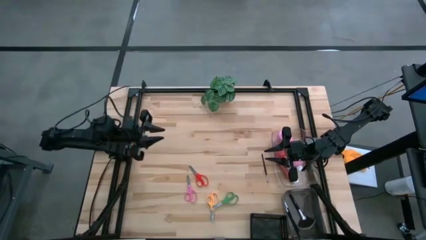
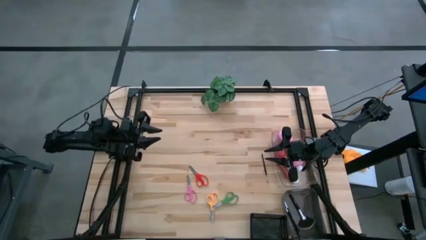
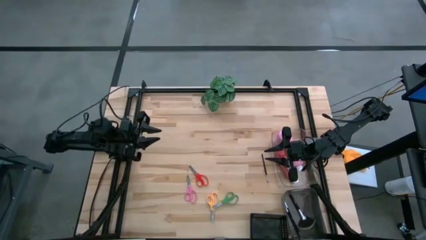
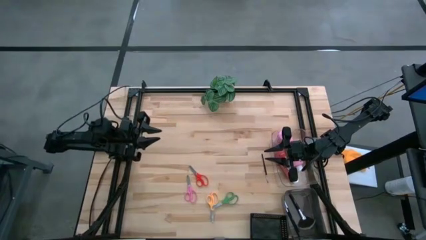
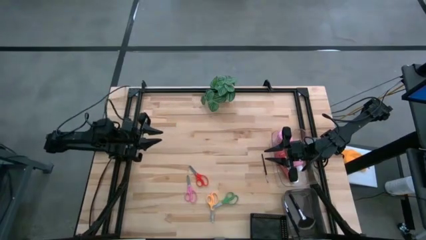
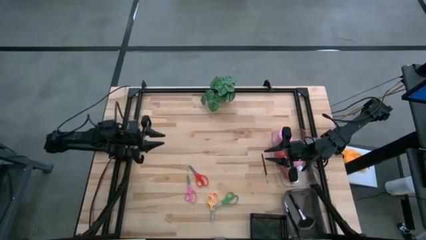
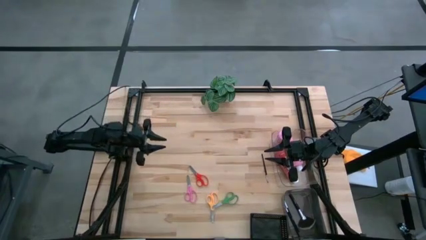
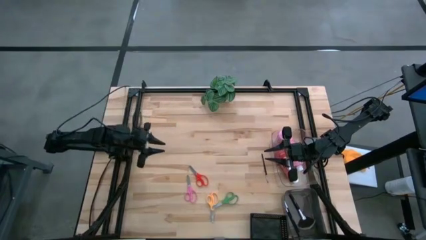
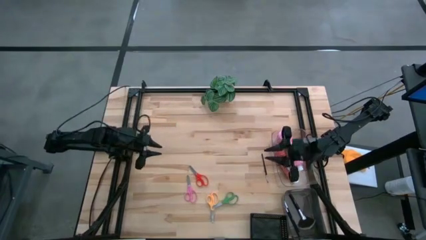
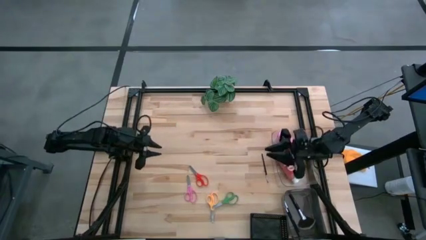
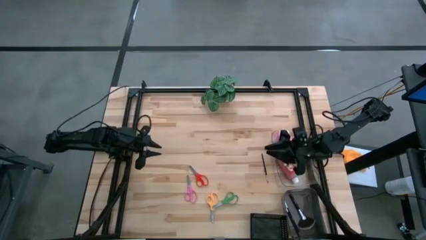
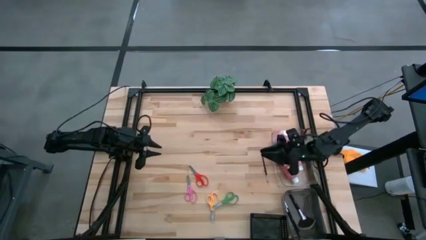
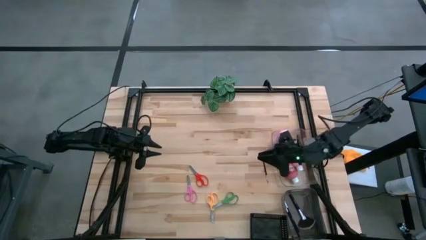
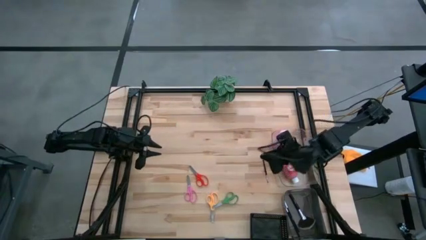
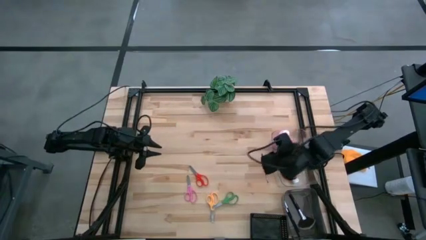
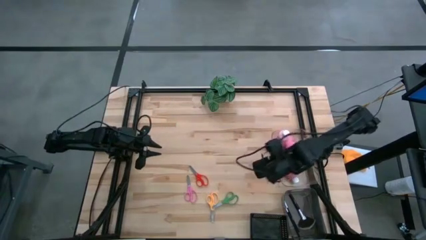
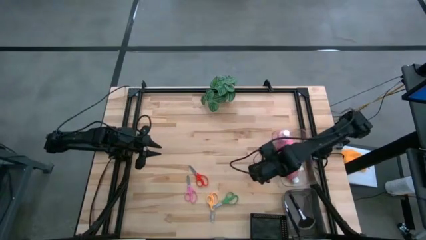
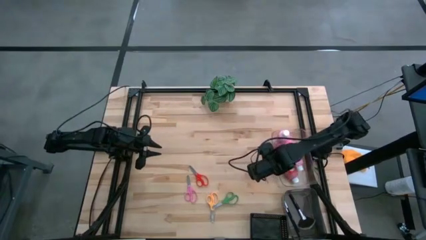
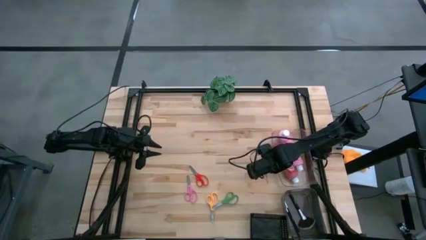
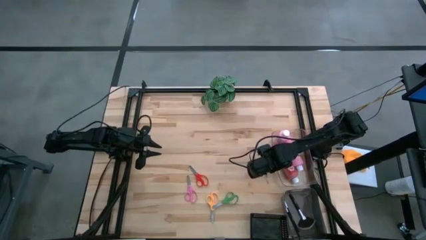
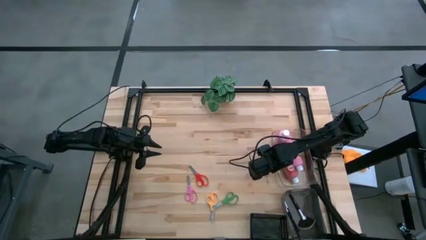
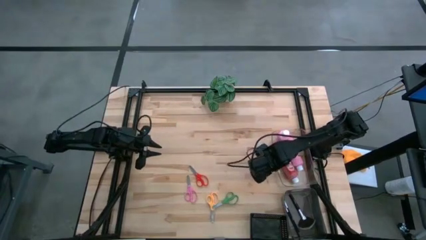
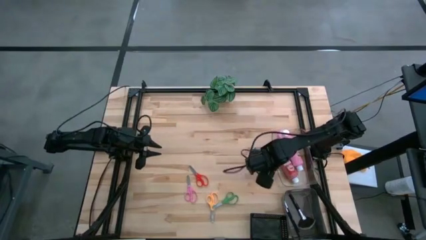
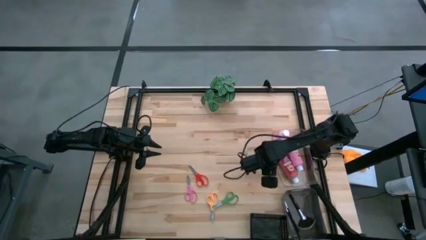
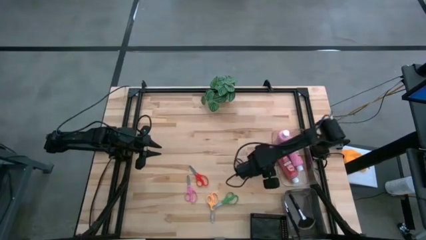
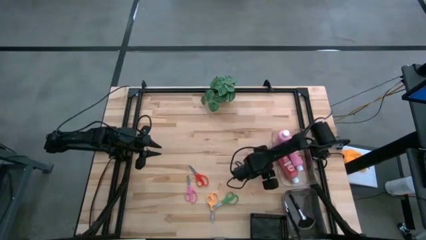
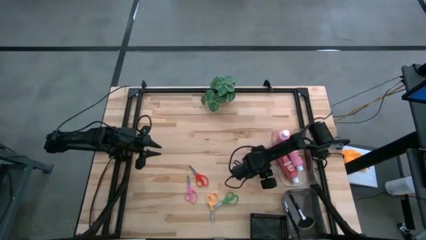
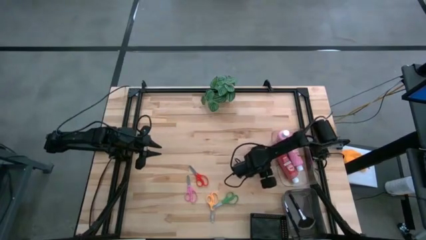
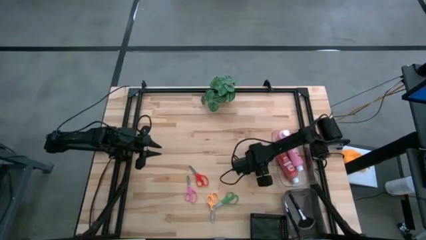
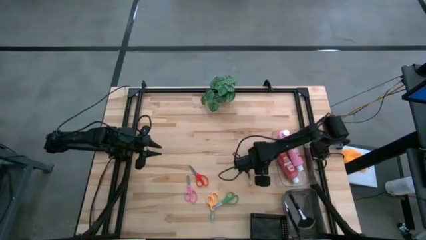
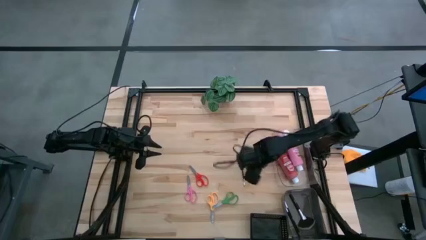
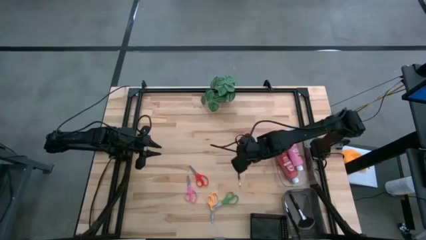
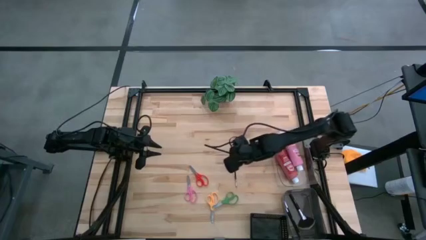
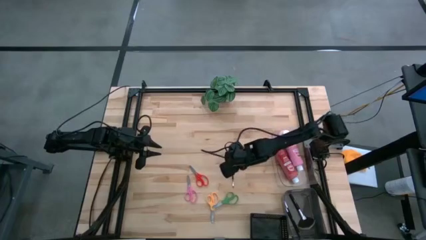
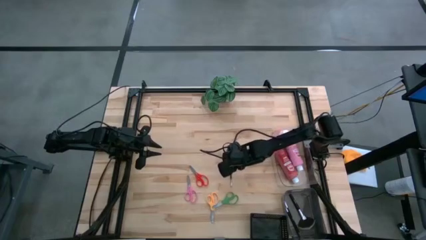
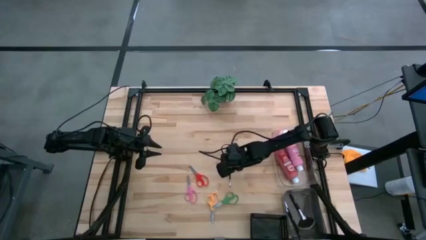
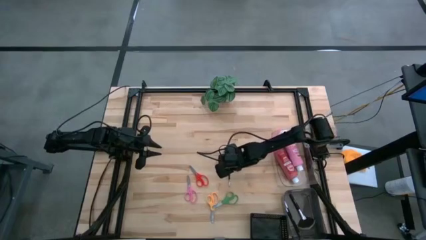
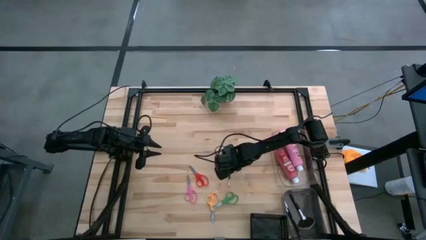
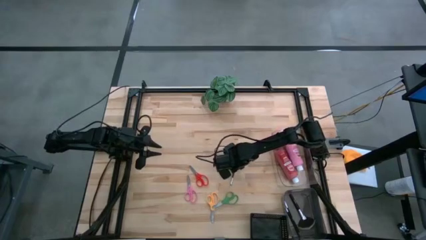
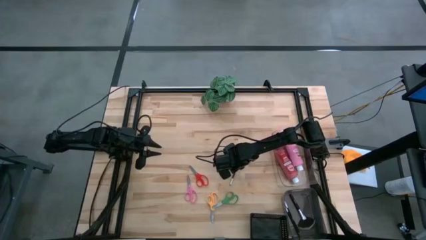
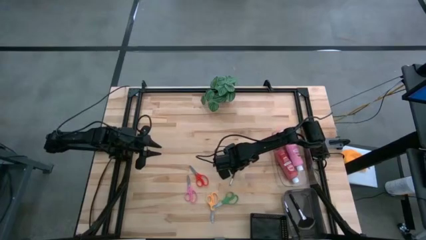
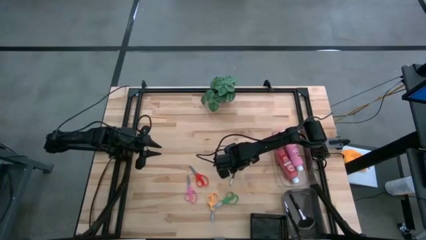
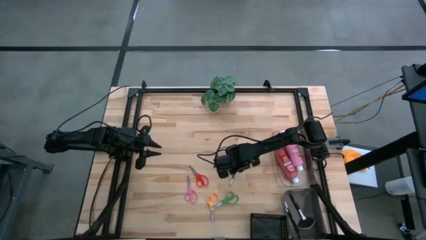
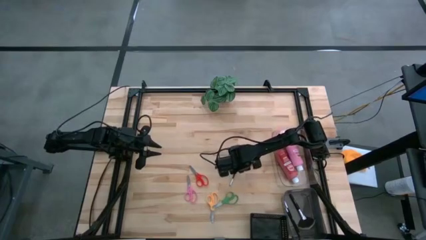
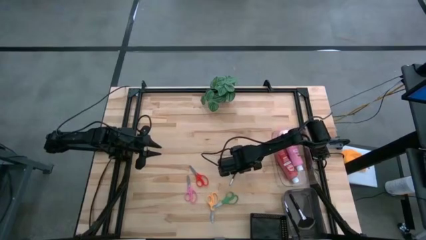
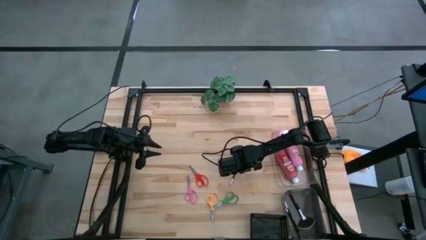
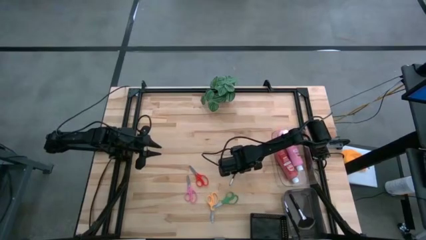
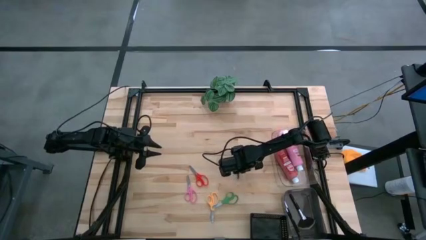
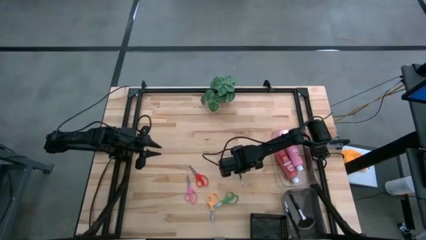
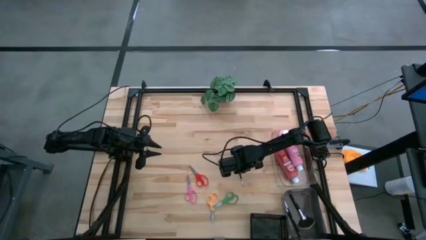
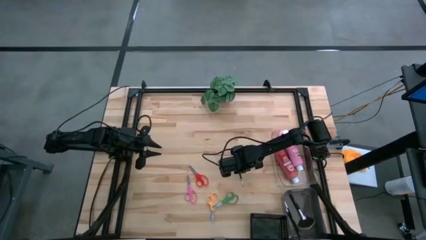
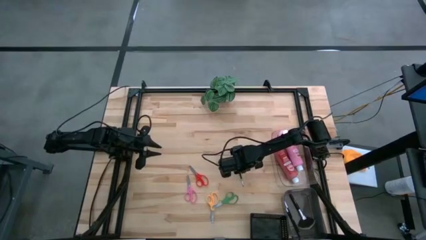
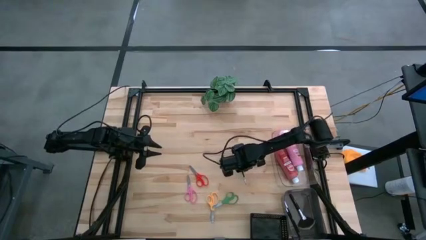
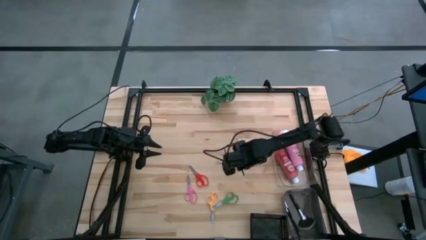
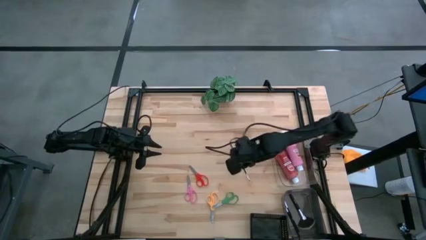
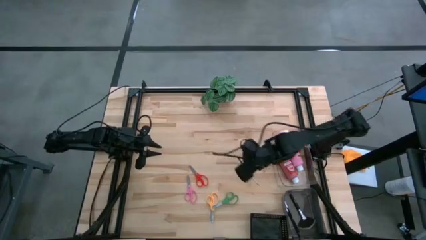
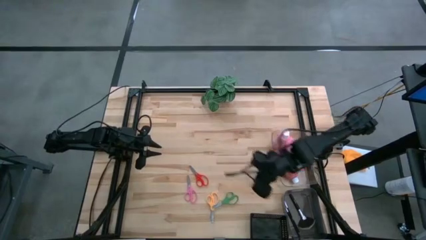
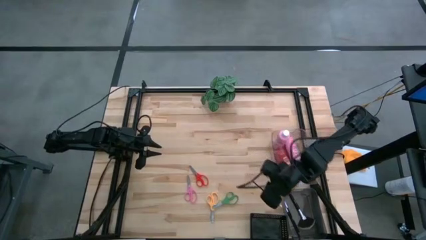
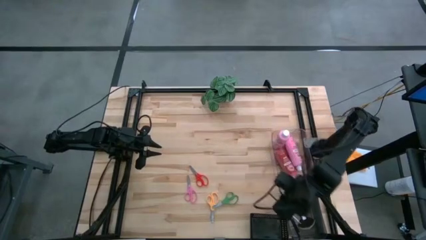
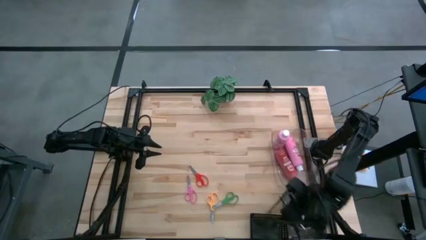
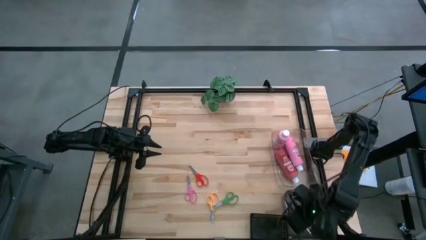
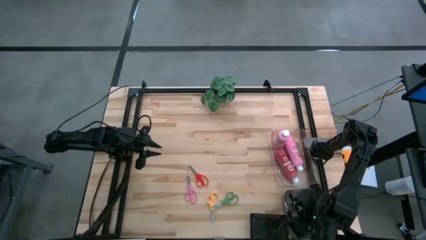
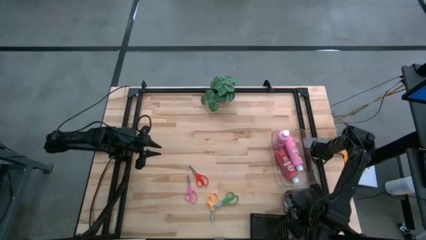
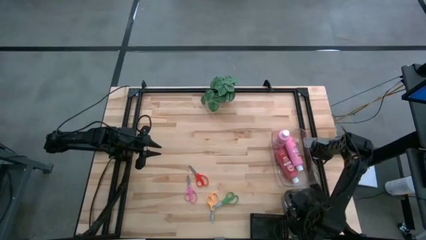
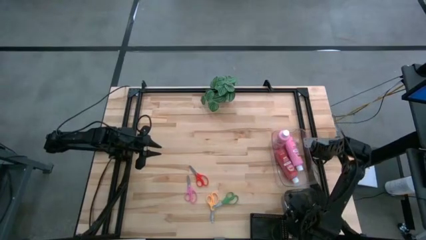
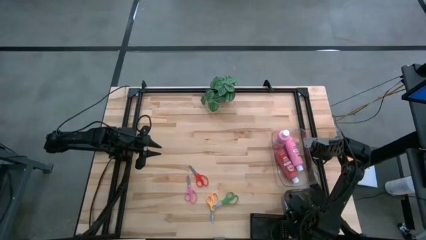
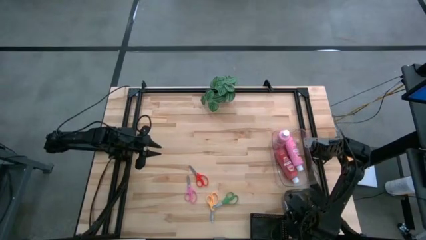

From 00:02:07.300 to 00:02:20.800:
Task: Pick & Place Paint Supplies
Put the black paint brush into the gray bin
